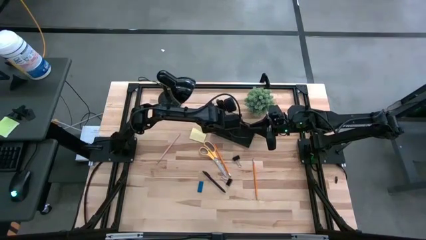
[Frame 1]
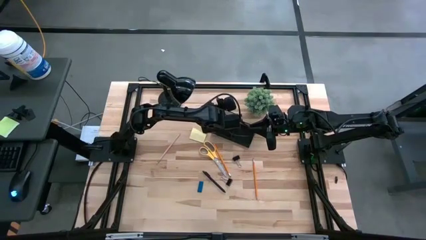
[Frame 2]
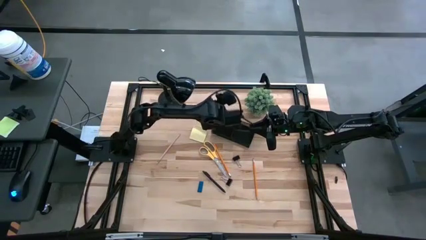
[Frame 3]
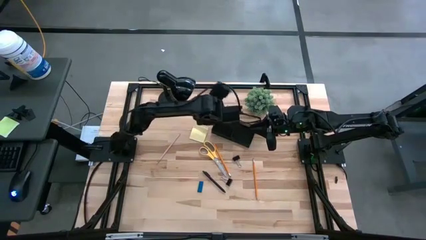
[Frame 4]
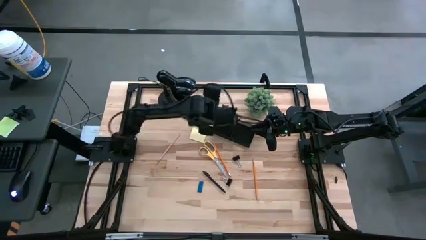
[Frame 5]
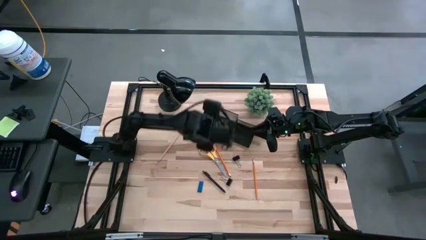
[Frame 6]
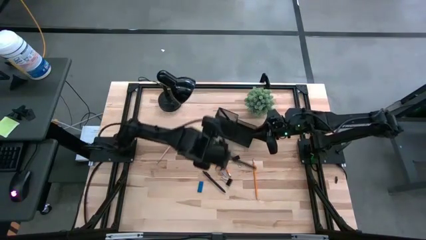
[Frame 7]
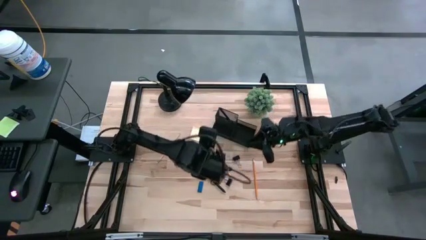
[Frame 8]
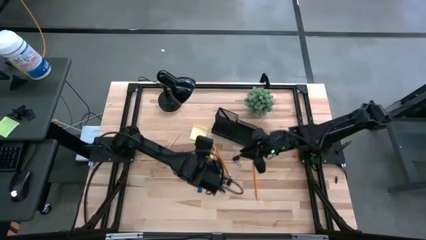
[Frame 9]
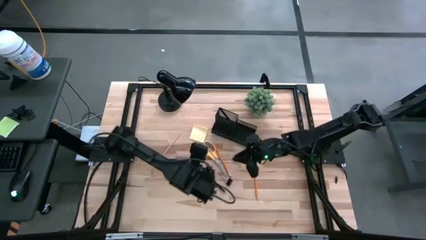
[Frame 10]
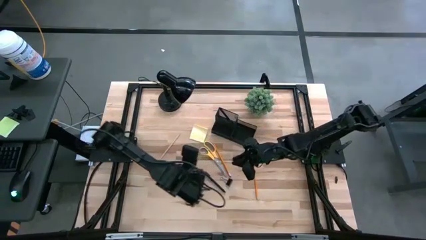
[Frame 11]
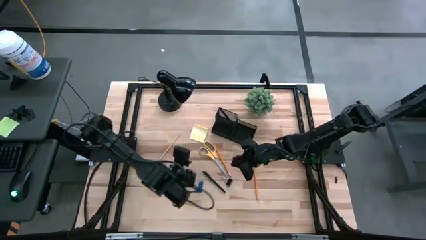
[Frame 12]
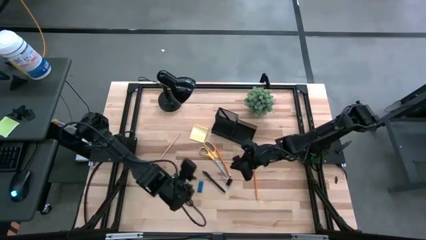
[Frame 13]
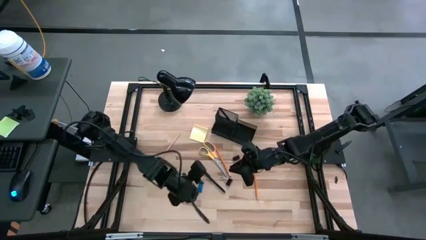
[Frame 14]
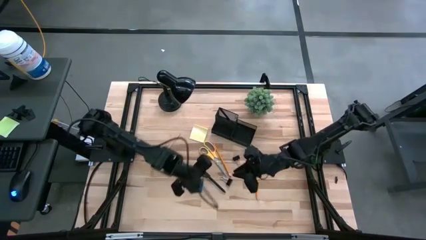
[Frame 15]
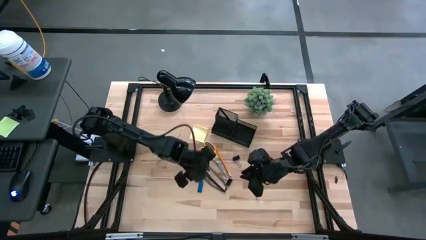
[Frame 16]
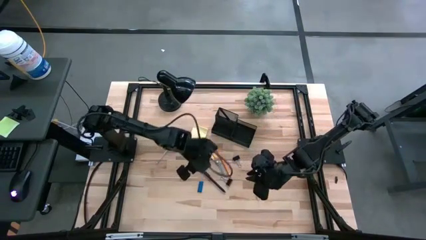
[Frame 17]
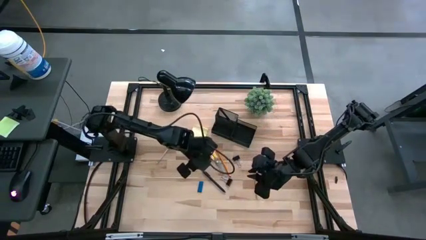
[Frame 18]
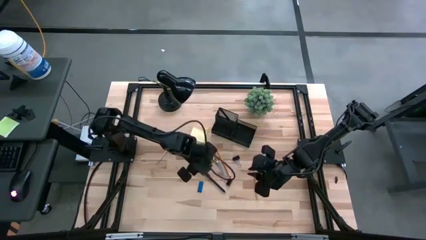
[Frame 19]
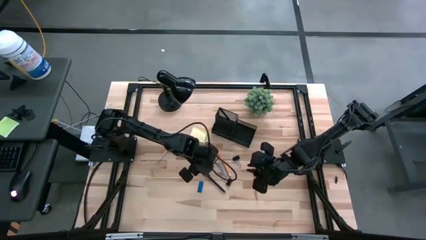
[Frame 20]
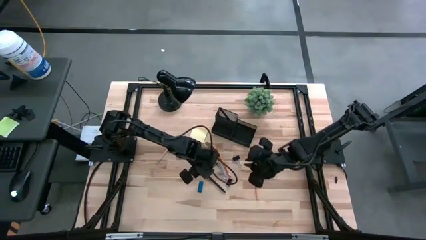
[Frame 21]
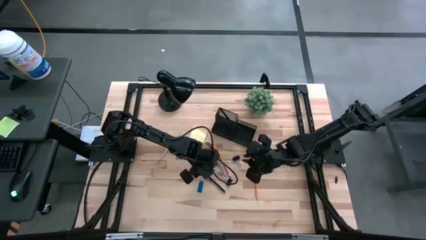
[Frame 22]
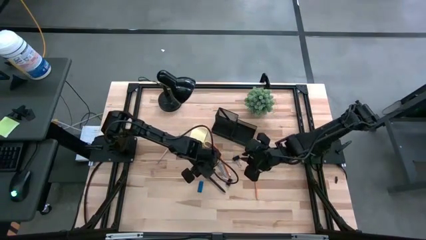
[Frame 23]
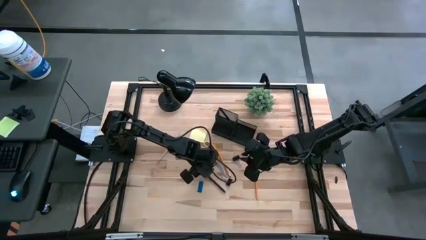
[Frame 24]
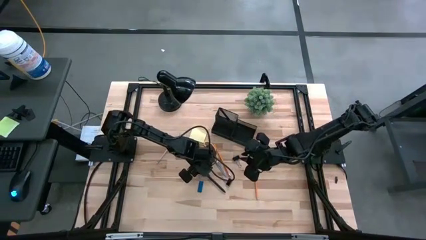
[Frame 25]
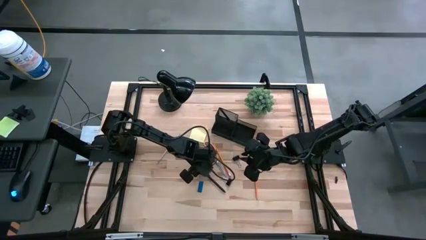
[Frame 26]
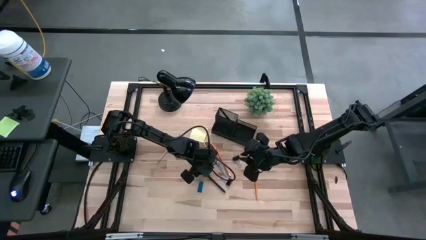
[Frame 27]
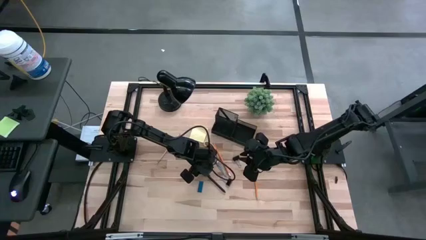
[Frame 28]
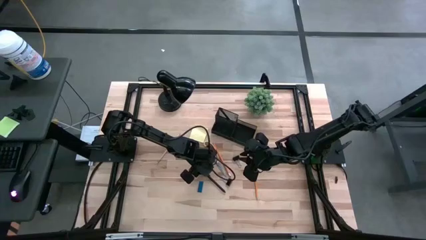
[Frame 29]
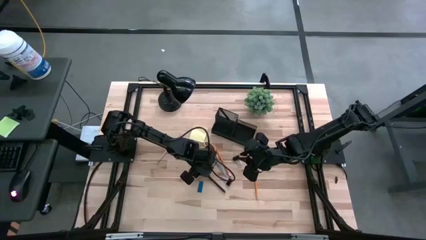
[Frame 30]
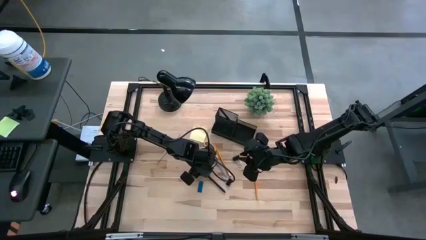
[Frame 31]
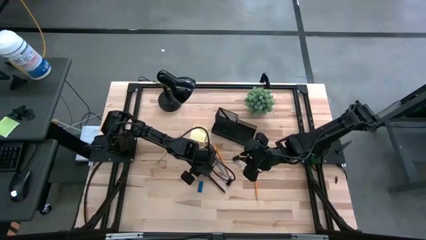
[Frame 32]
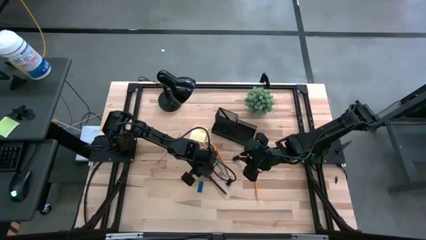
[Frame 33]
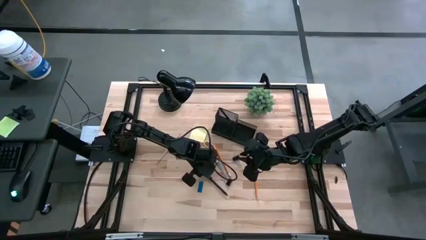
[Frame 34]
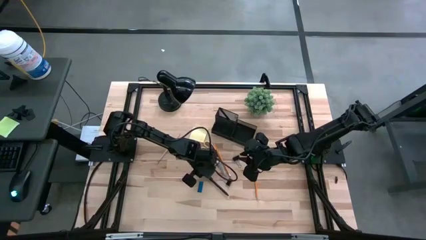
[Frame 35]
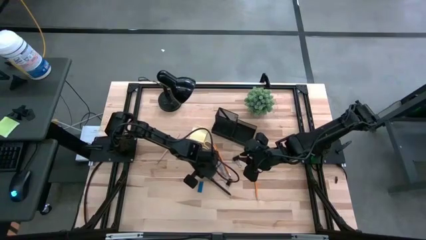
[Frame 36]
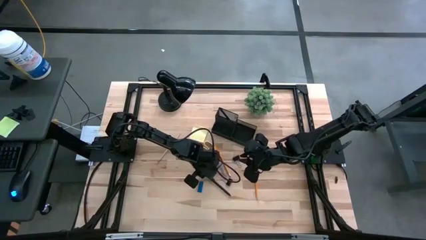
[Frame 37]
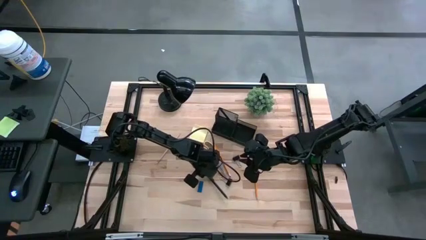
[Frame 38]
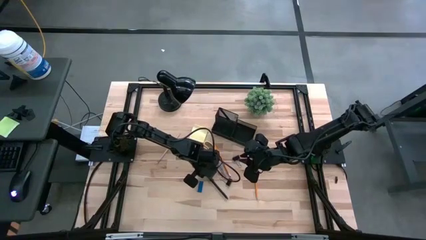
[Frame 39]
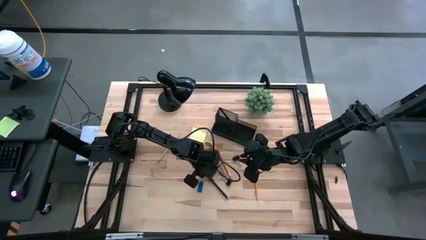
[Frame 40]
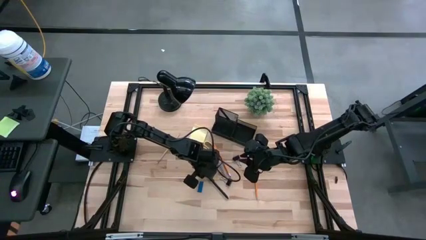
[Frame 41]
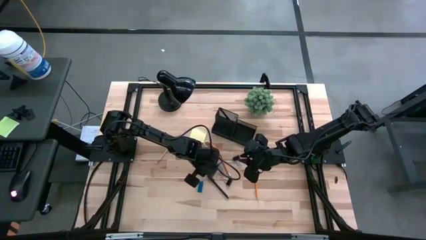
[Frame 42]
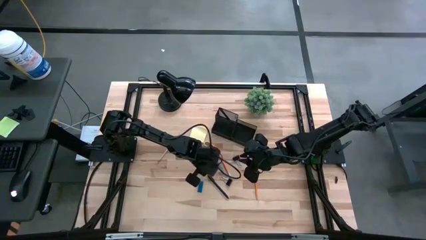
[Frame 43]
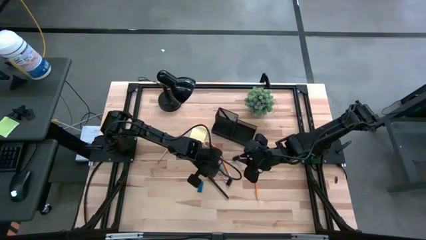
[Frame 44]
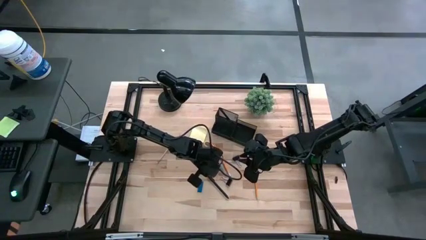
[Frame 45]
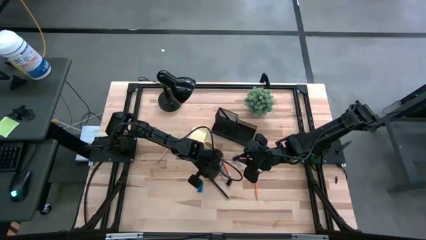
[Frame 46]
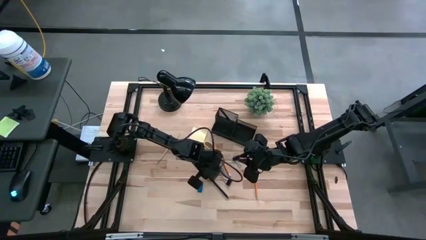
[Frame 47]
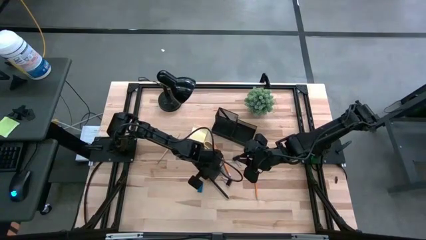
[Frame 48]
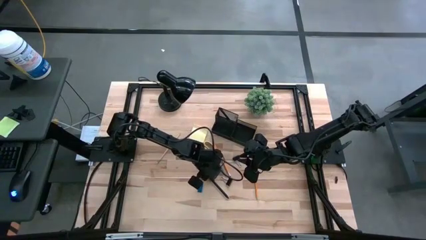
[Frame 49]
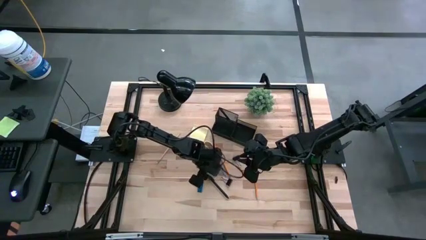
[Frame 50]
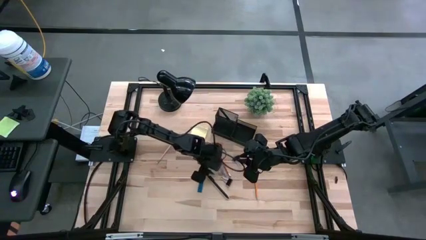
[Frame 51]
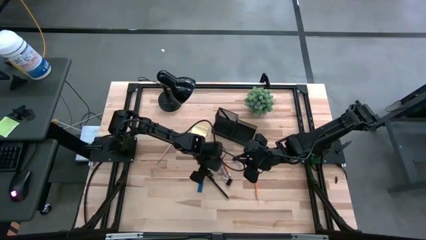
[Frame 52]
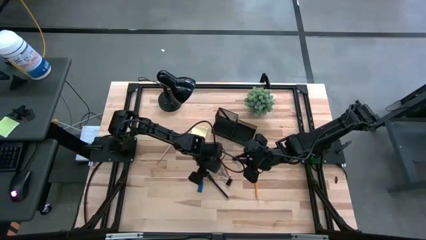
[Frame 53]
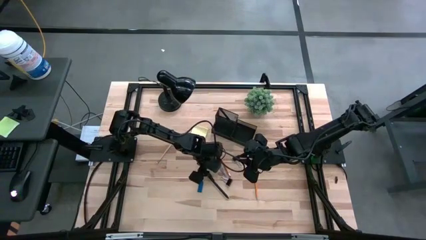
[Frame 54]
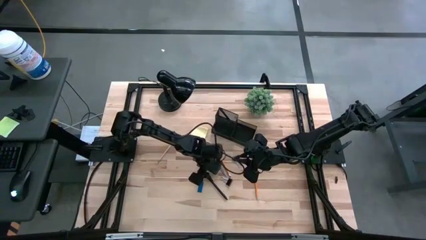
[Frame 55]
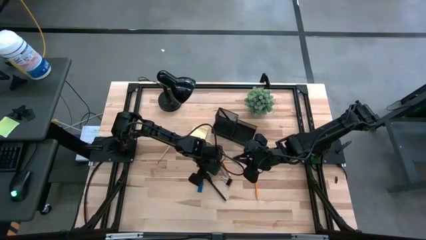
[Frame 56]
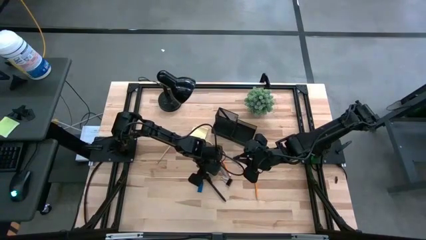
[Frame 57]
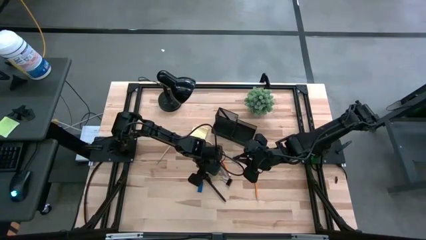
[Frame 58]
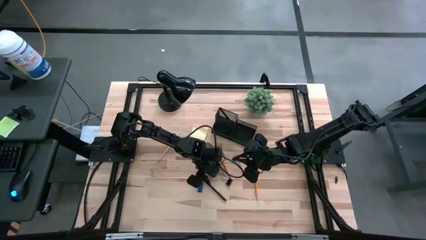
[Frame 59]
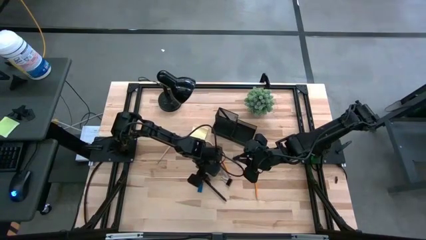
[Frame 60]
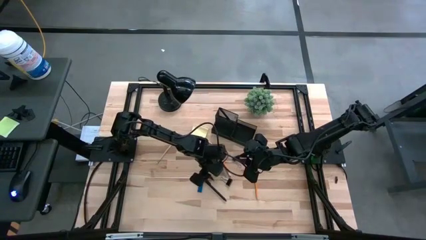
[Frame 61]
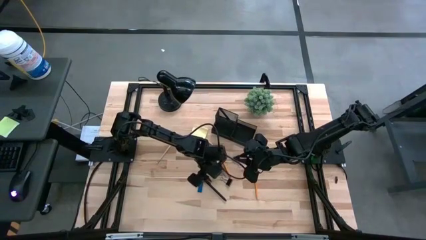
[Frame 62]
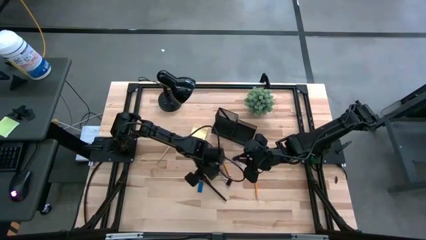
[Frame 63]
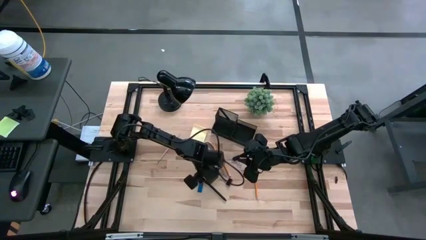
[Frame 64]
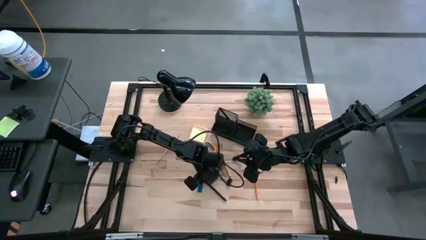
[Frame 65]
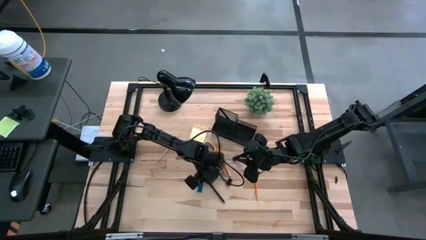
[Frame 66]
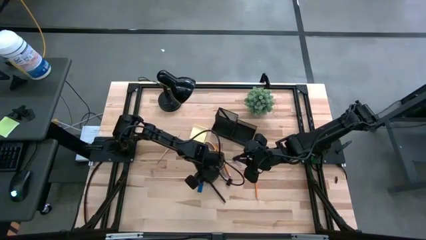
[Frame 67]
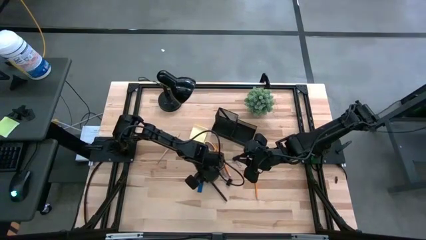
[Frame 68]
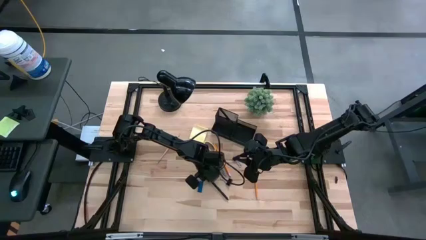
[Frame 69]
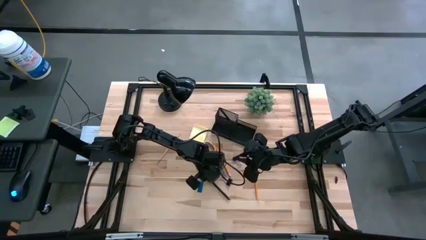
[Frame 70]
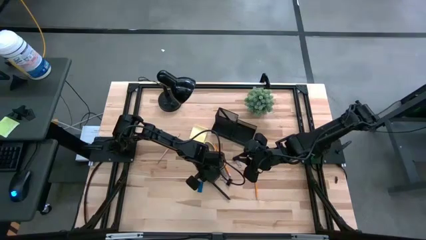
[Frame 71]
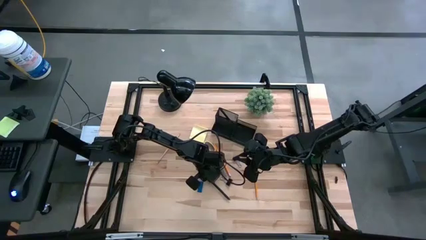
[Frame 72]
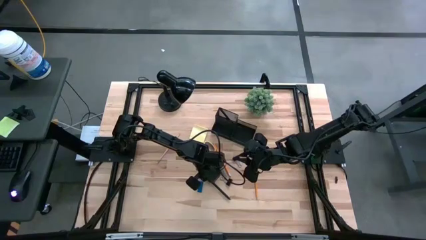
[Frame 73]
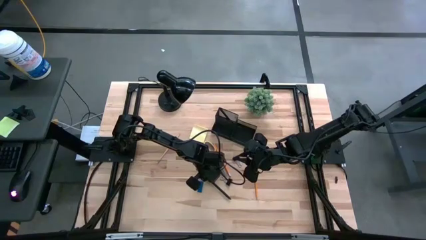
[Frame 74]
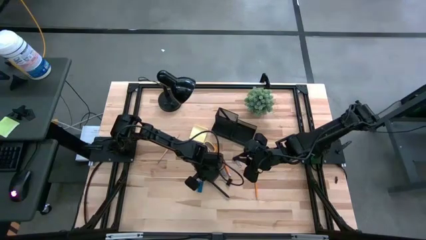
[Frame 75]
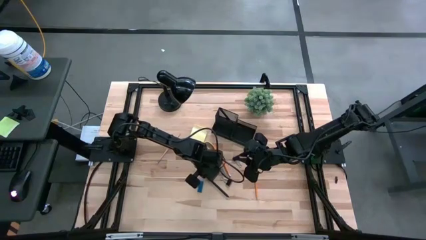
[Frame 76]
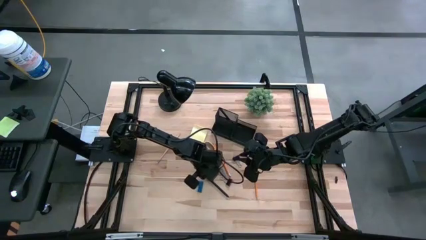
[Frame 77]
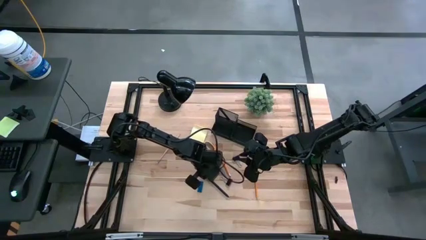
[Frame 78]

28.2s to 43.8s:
Task: Pick and place office supplies into organizer
Put the pen into the desk organizer
